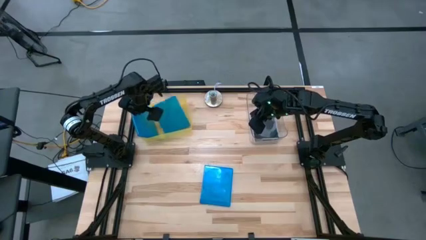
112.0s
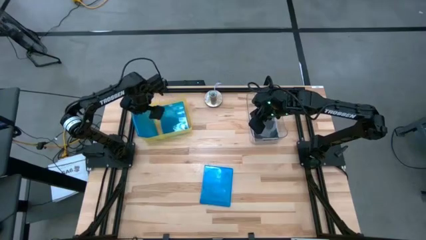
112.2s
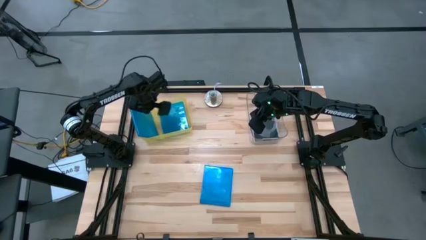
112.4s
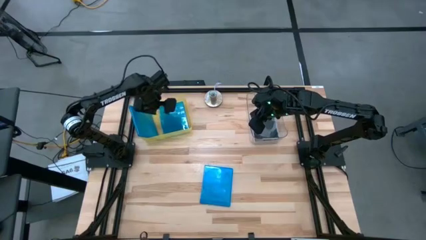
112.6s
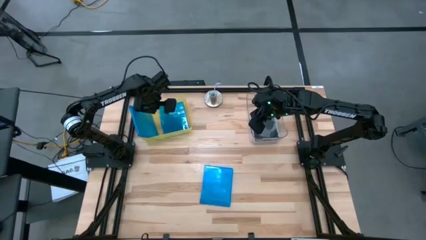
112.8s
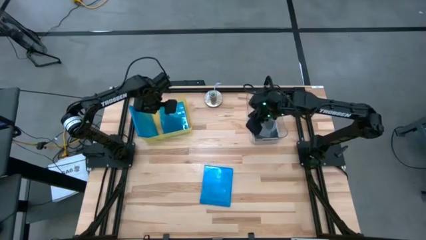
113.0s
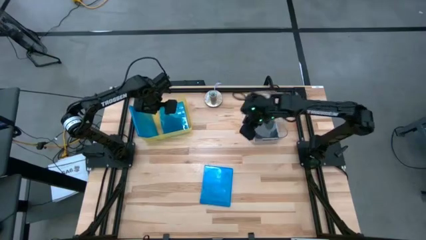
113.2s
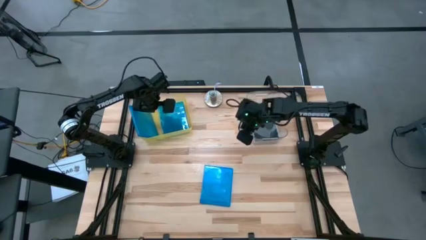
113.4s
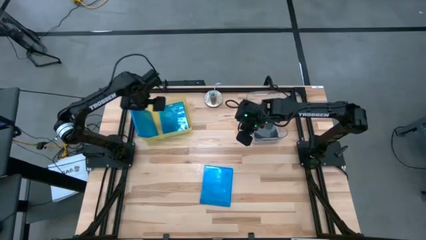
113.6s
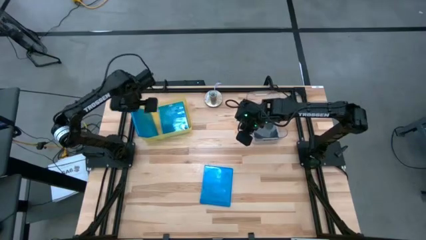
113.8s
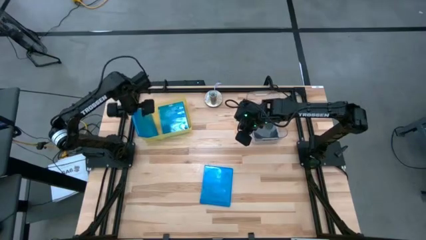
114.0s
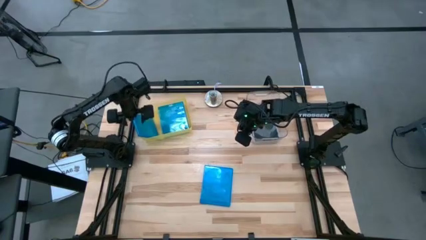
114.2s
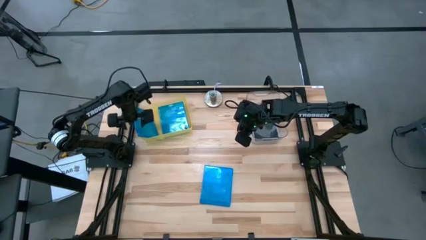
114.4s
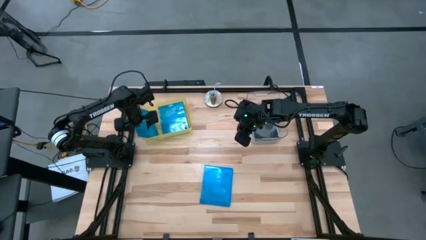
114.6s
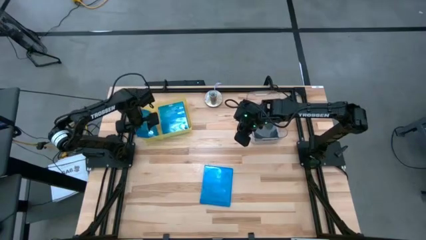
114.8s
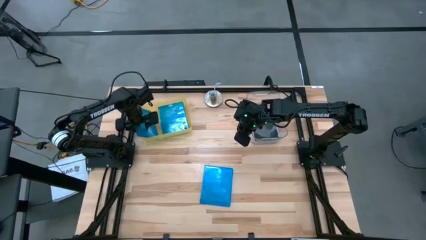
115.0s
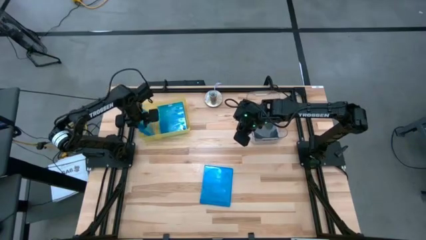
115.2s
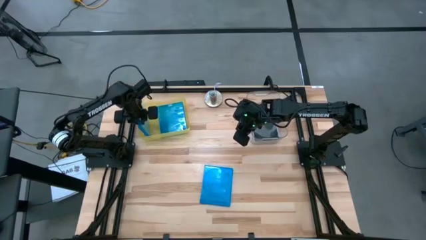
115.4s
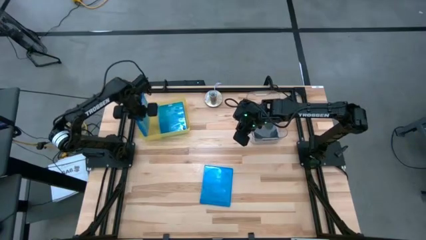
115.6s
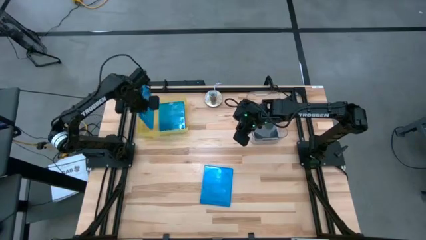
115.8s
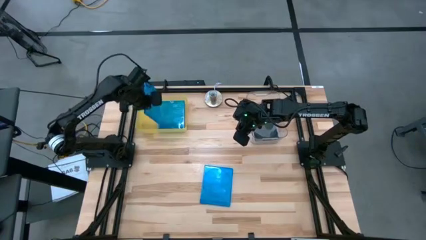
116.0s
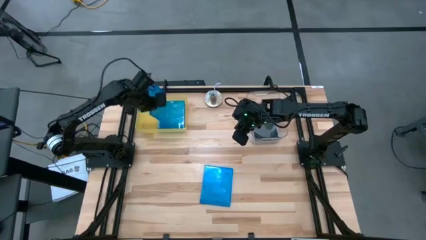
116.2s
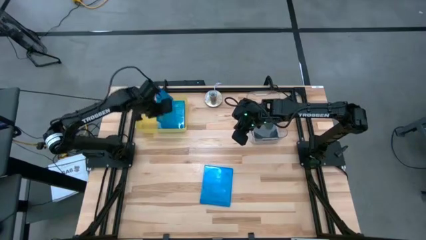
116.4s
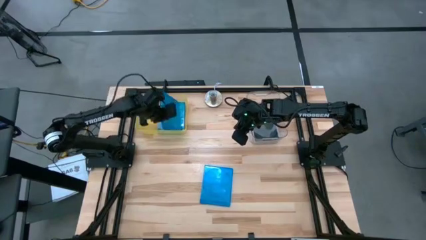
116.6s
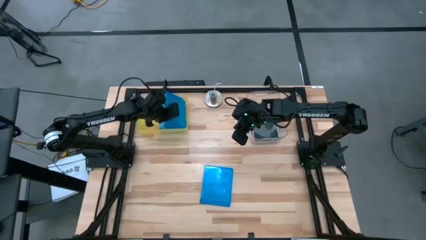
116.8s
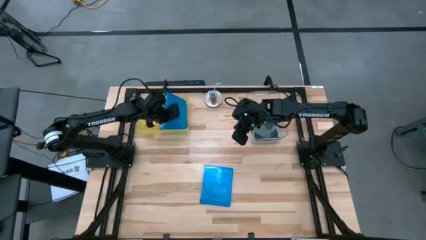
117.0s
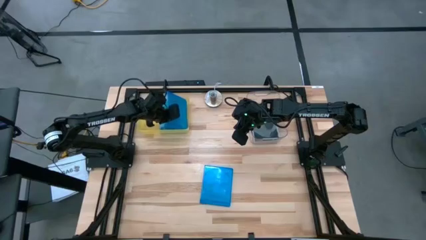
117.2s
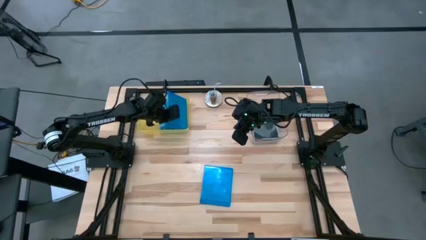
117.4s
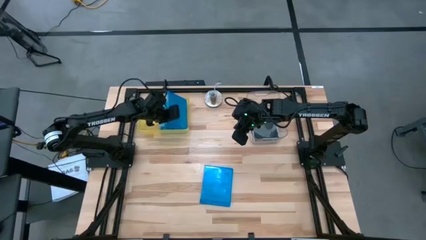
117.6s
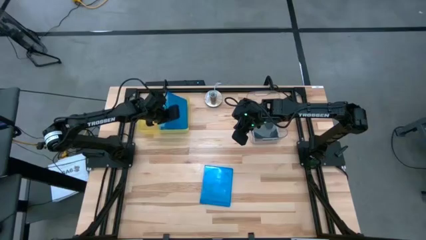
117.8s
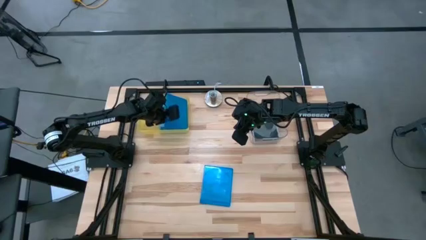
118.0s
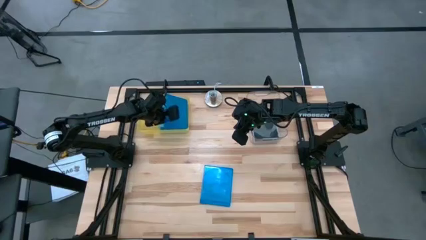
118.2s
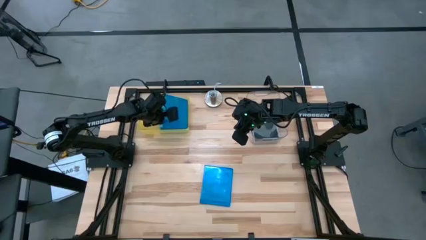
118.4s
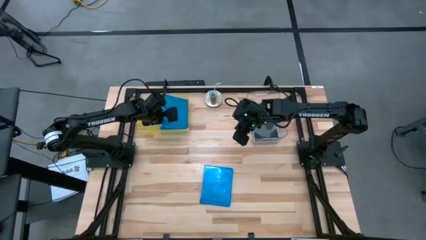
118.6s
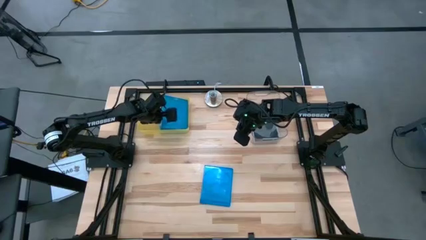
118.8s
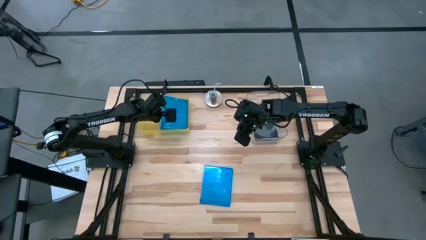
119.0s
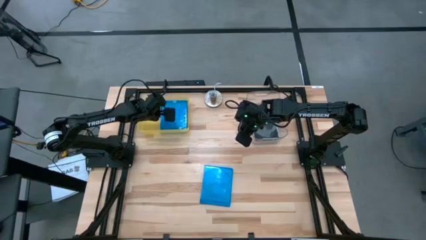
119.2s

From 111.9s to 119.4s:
Task: Pick & place jewel cases by type
Put the blue CD case into the yellow bin

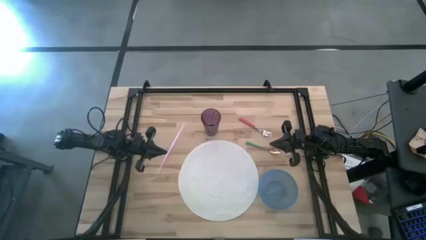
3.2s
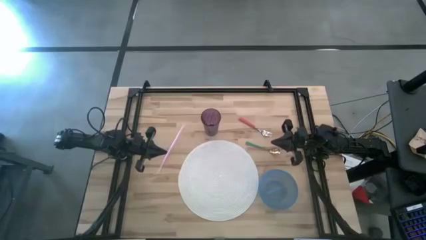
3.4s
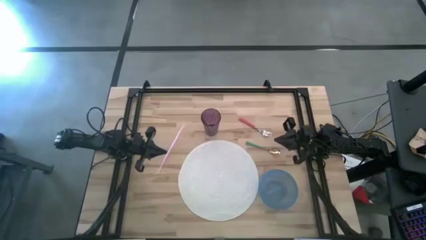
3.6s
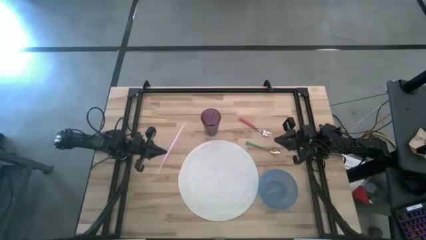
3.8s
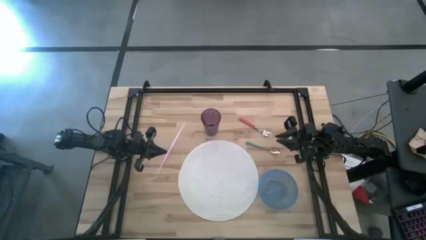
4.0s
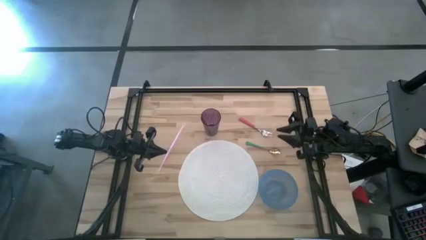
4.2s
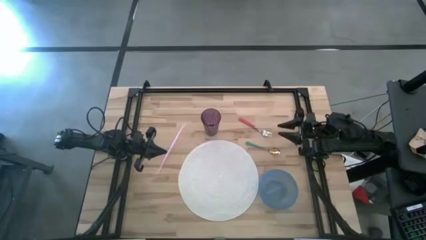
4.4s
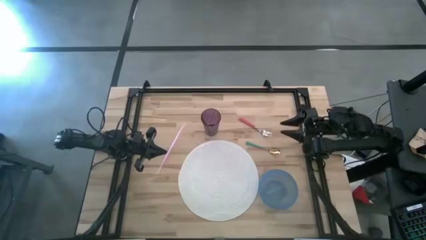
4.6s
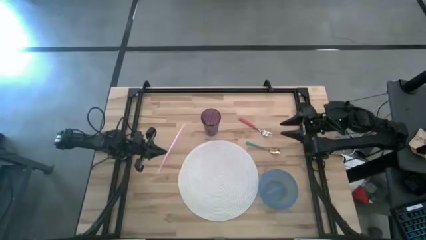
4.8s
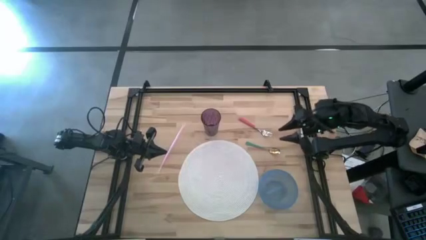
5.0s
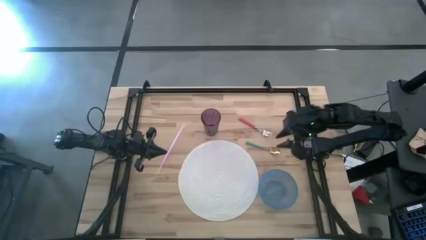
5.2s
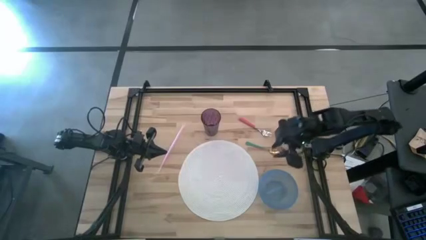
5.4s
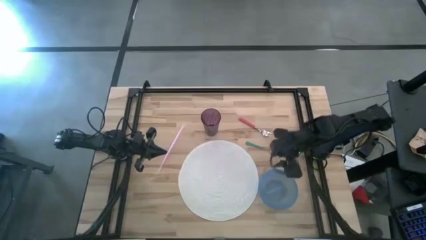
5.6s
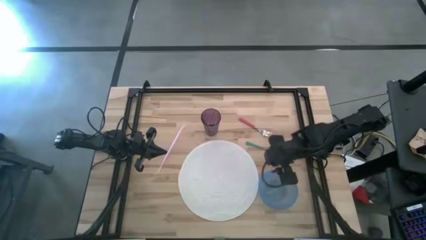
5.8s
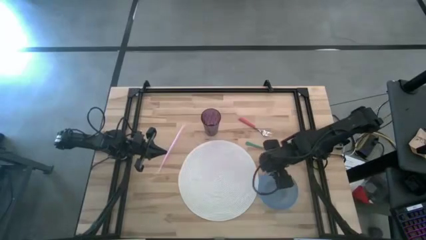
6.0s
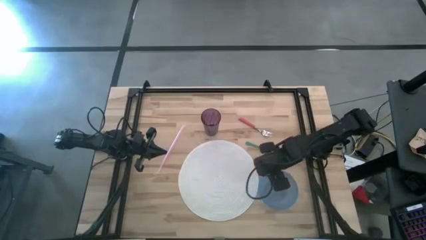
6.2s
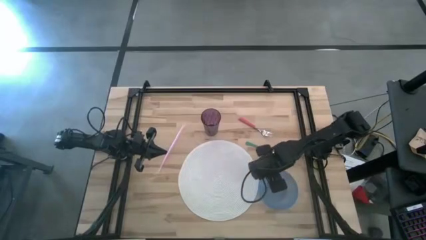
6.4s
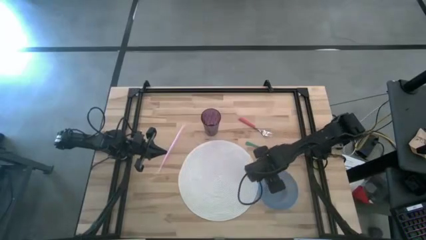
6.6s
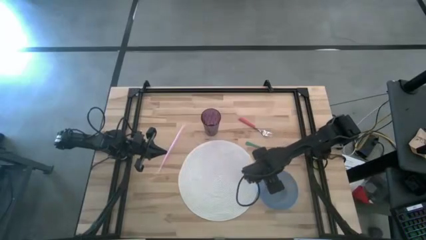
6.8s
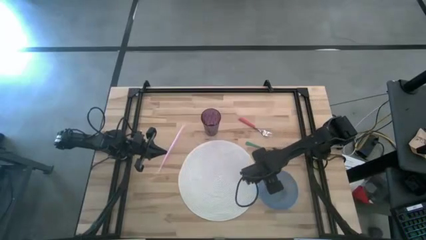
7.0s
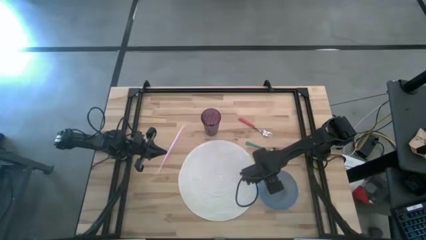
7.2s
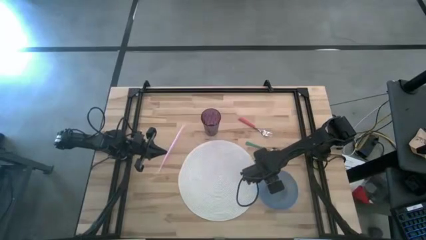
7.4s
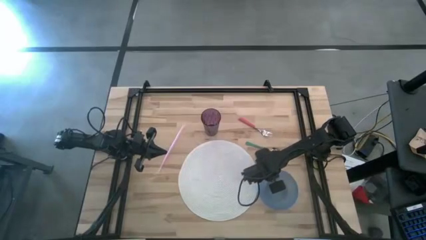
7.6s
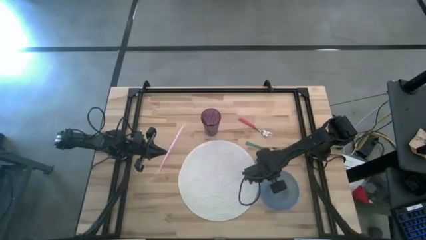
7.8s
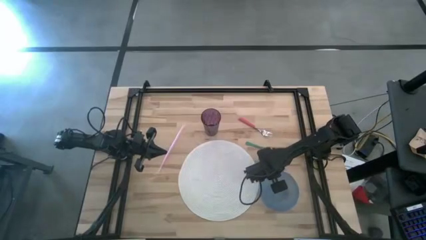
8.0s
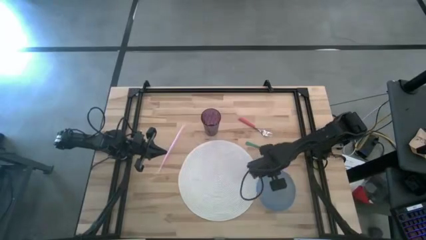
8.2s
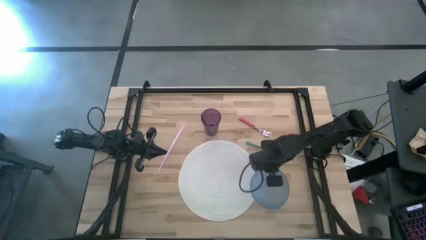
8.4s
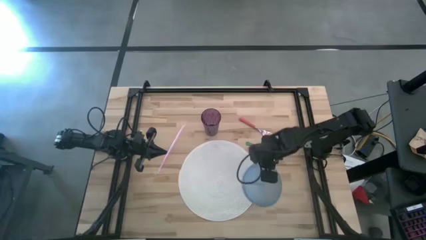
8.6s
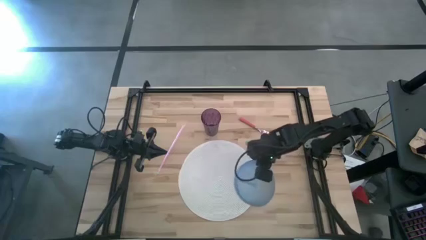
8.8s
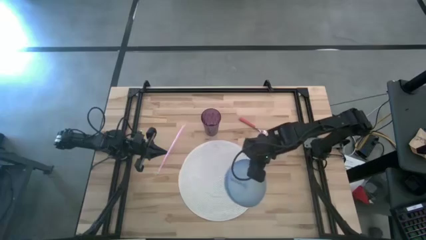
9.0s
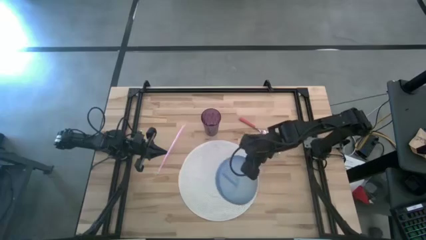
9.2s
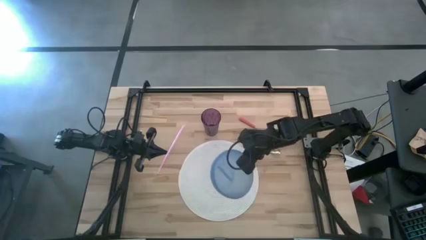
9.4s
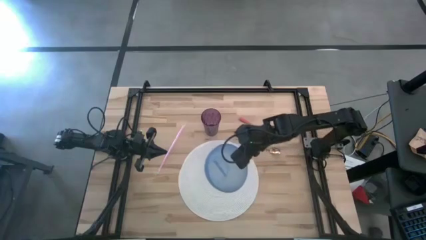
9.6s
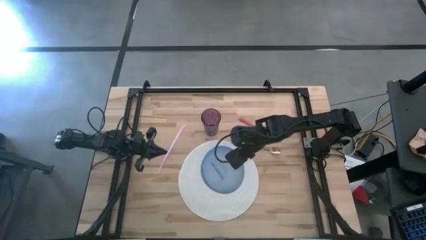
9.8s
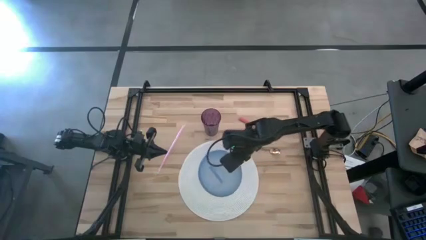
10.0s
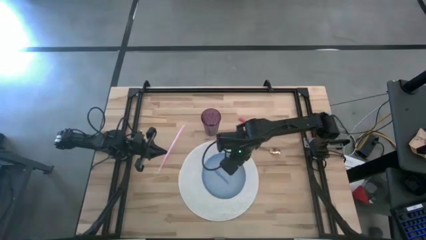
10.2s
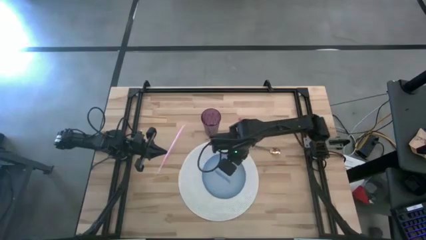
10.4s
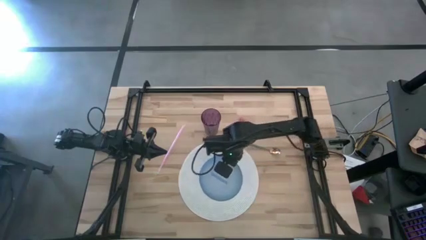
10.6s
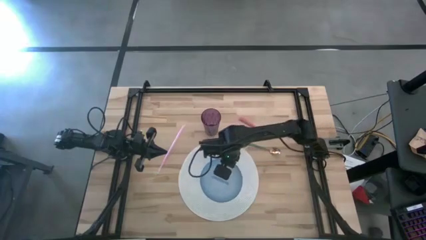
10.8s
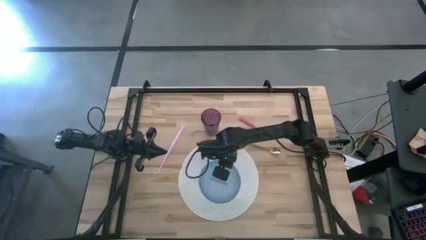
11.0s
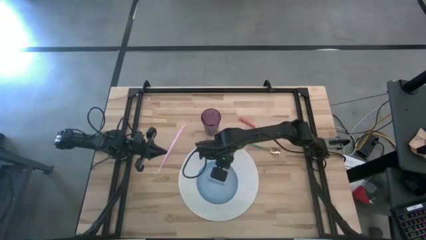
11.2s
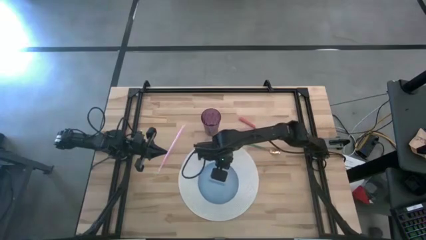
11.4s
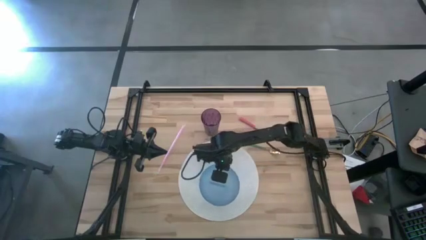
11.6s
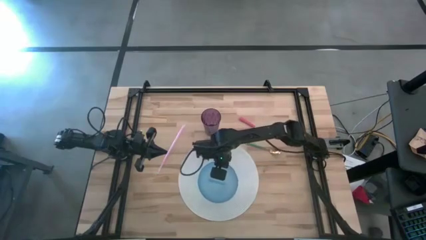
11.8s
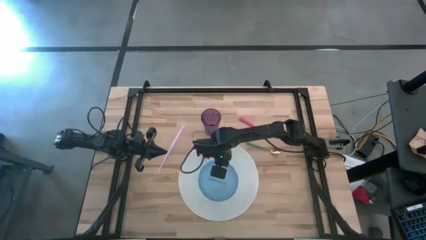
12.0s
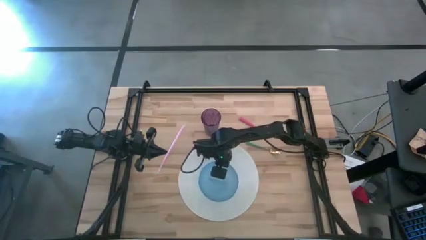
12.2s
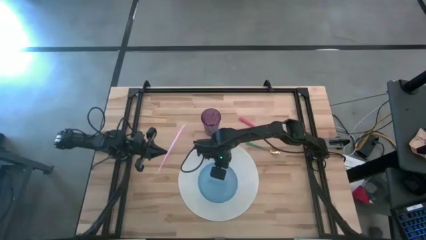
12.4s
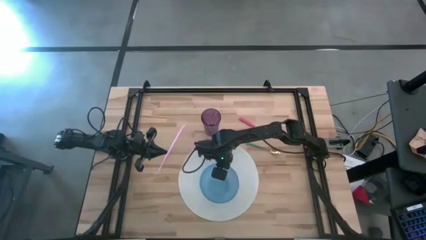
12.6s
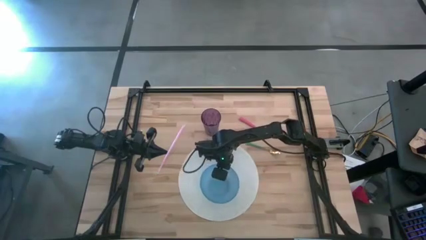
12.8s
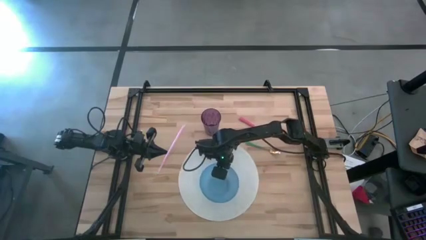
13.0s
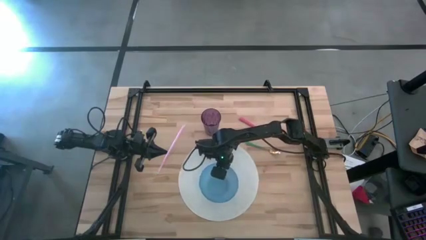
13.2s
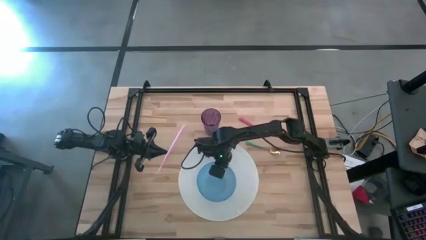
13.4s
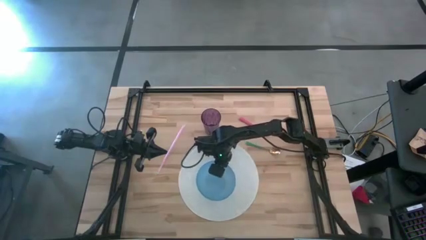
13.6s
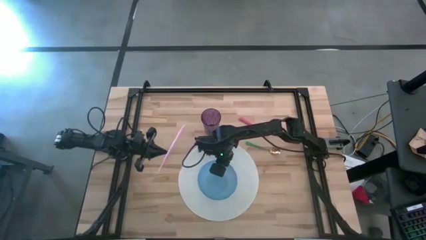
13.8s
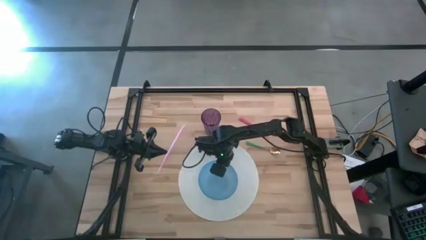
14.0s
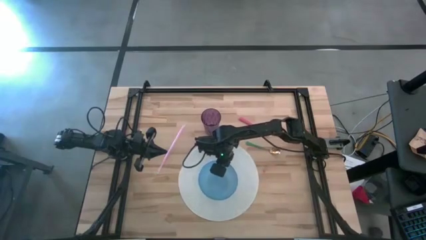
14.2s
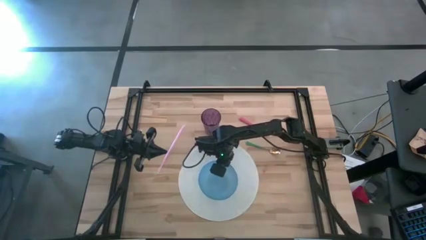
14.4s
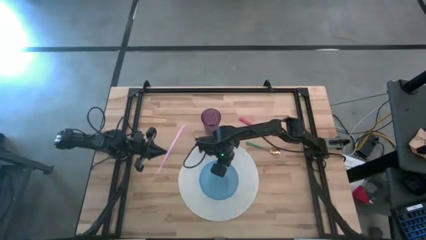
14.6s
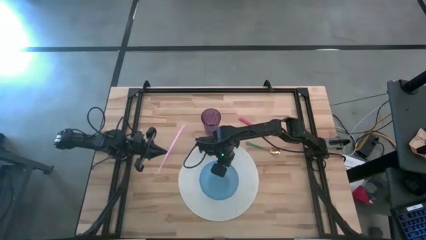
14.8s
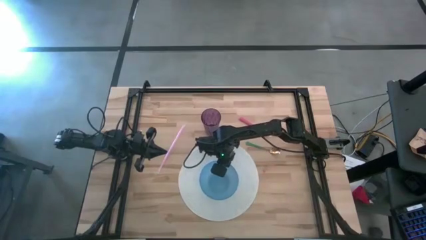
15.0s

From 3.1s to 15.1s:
Task: Pick & Place Utensil
Put the bowl in the center of the mat
